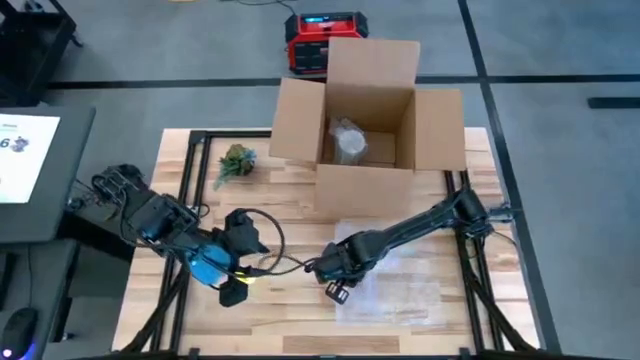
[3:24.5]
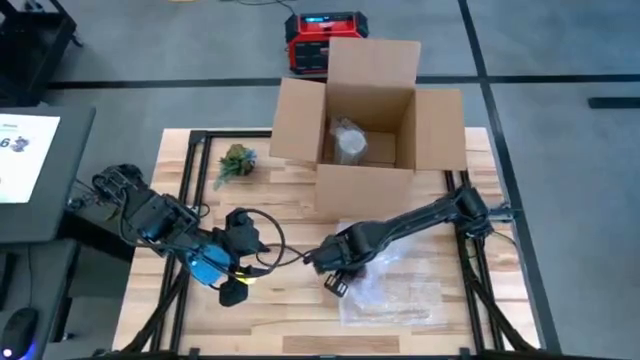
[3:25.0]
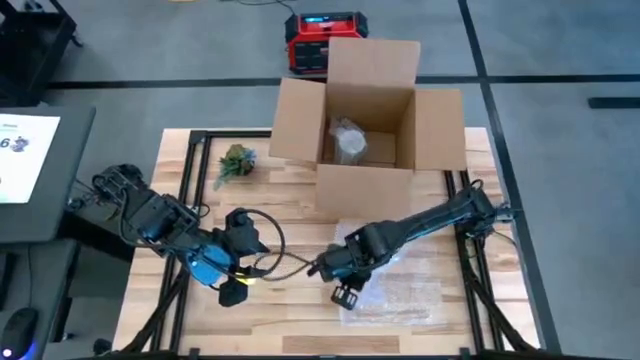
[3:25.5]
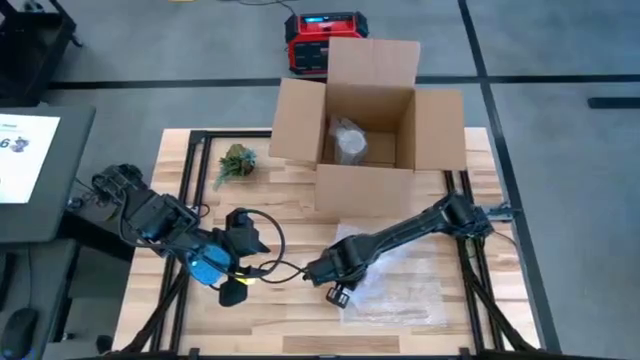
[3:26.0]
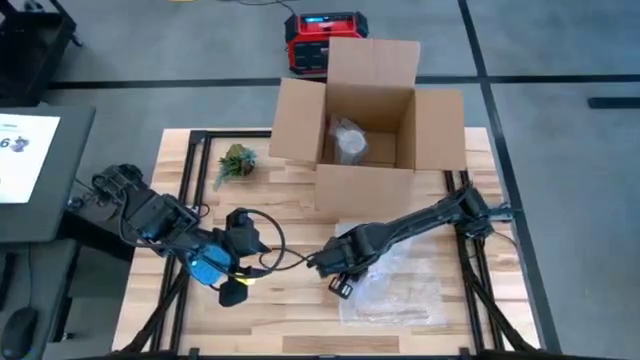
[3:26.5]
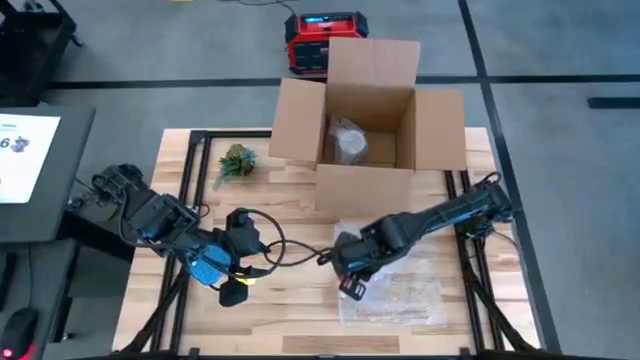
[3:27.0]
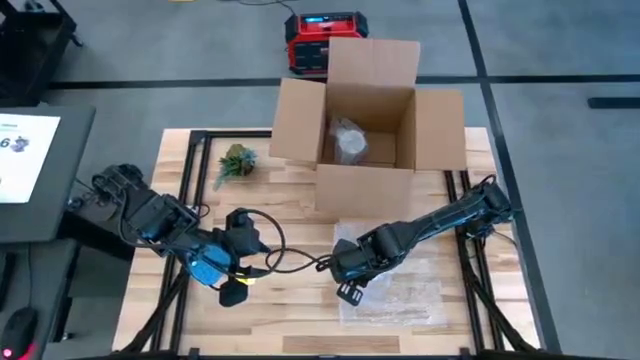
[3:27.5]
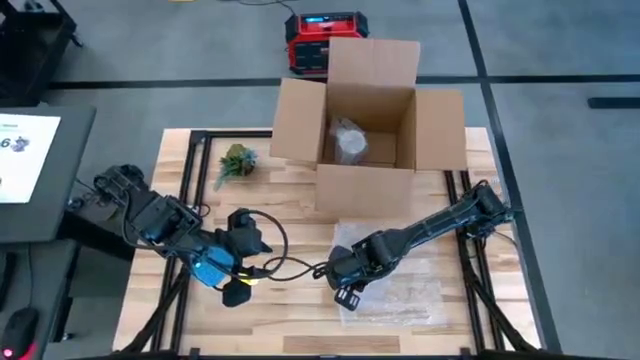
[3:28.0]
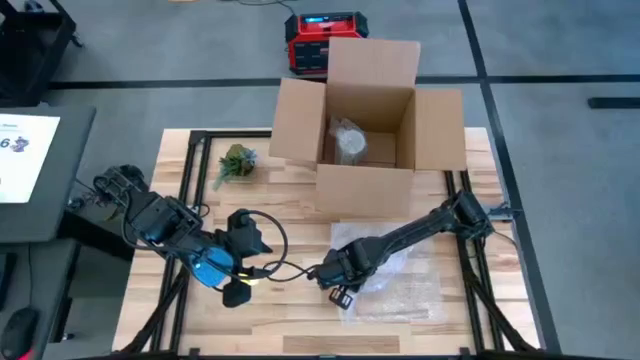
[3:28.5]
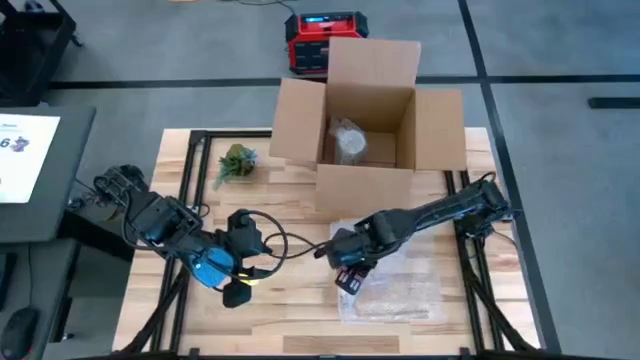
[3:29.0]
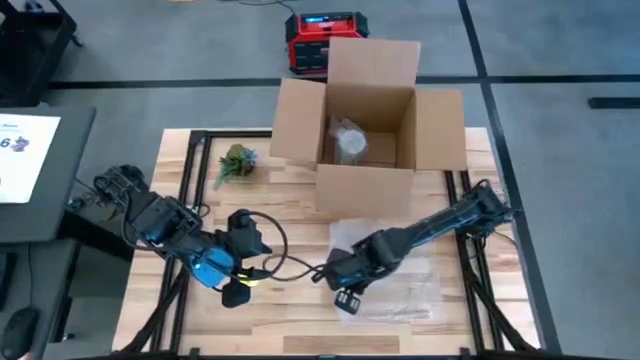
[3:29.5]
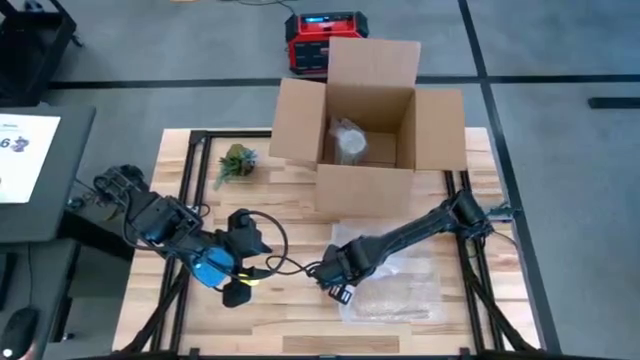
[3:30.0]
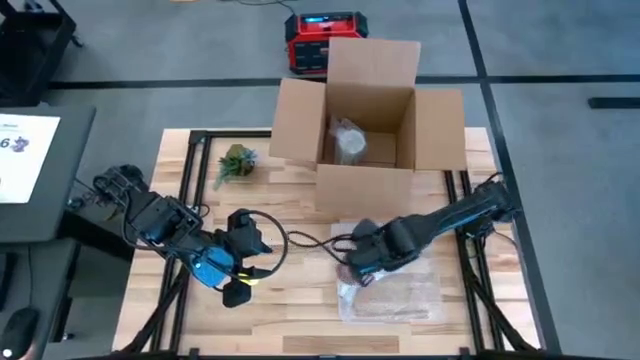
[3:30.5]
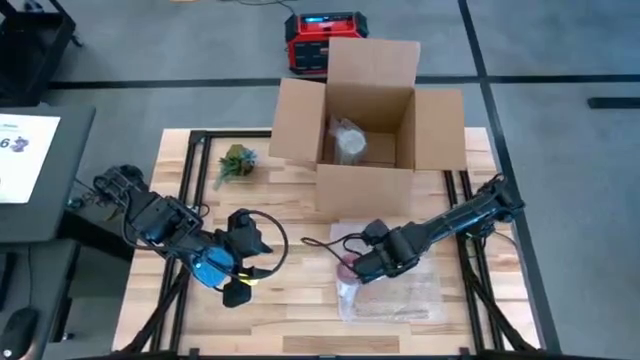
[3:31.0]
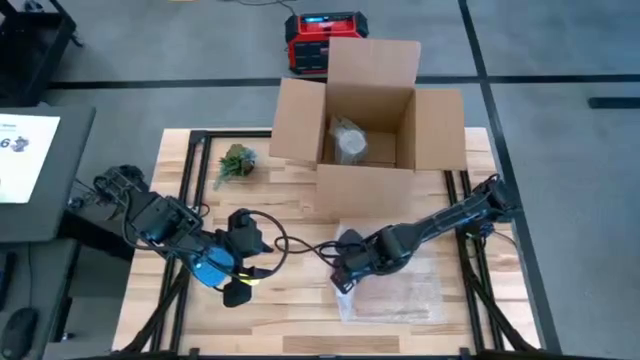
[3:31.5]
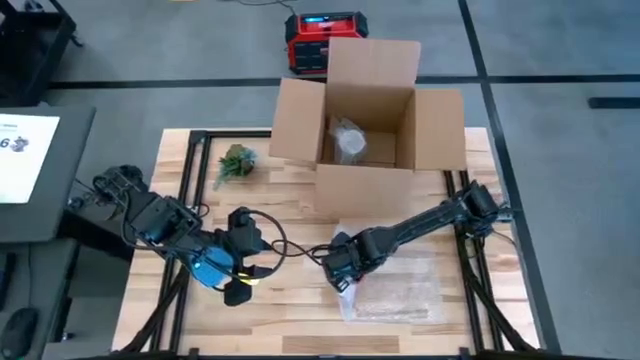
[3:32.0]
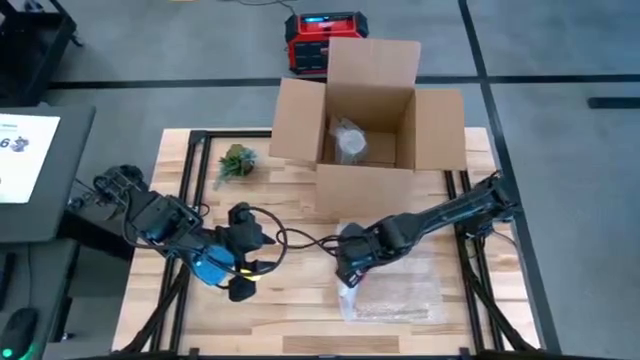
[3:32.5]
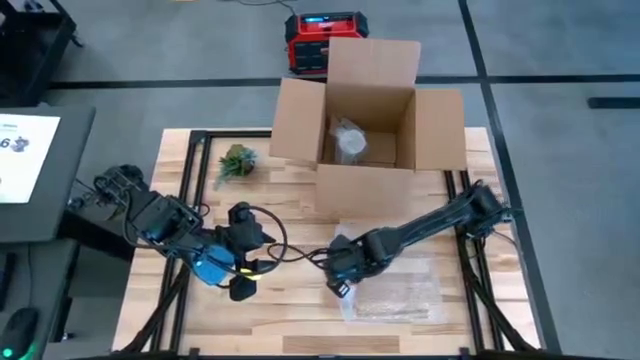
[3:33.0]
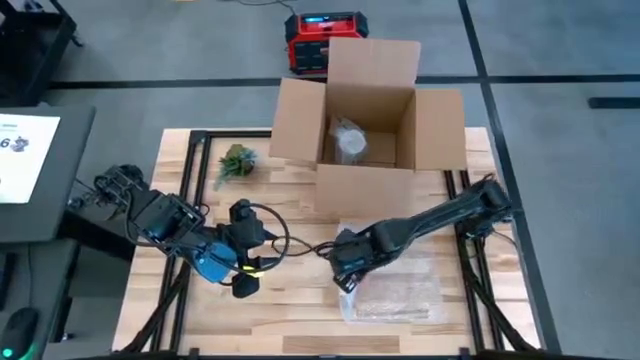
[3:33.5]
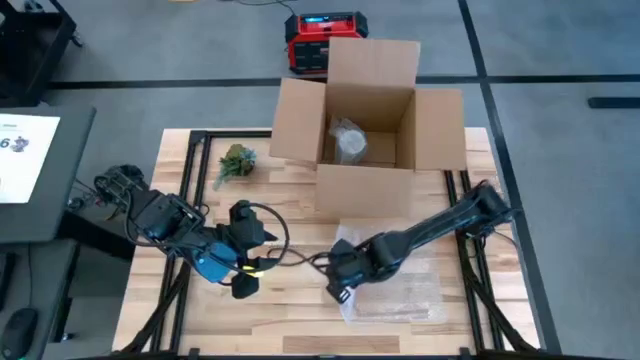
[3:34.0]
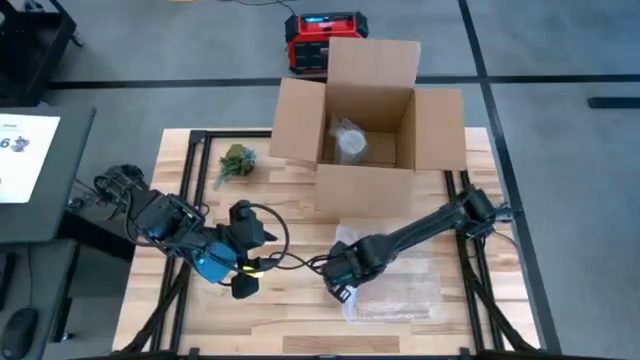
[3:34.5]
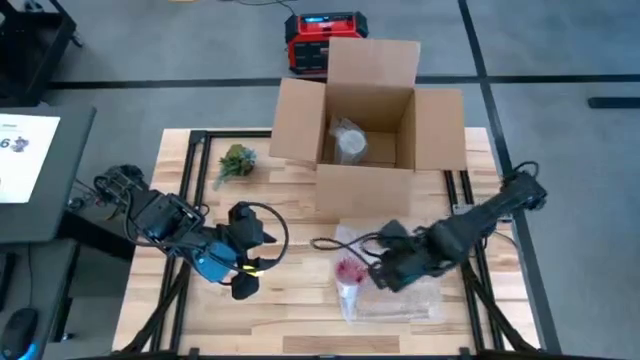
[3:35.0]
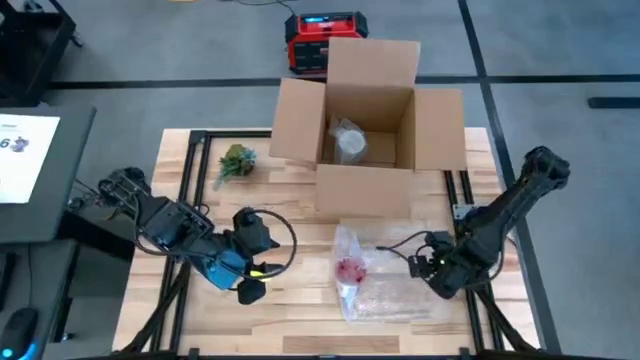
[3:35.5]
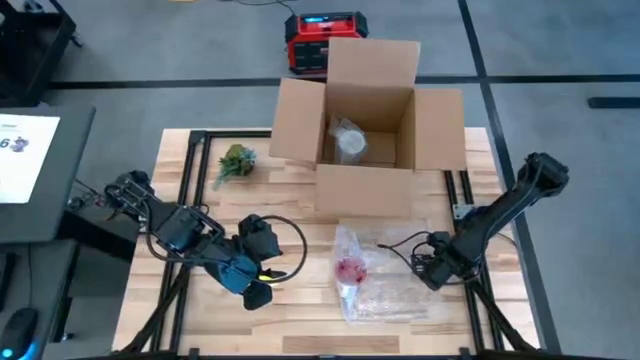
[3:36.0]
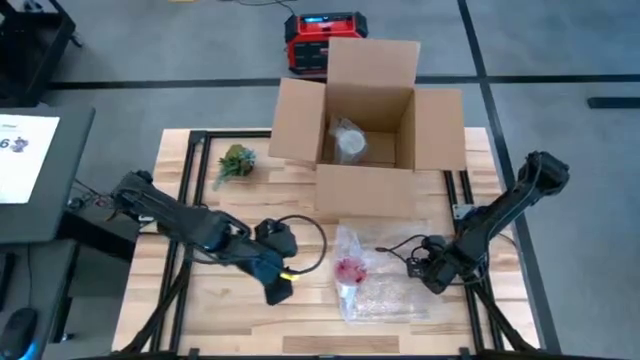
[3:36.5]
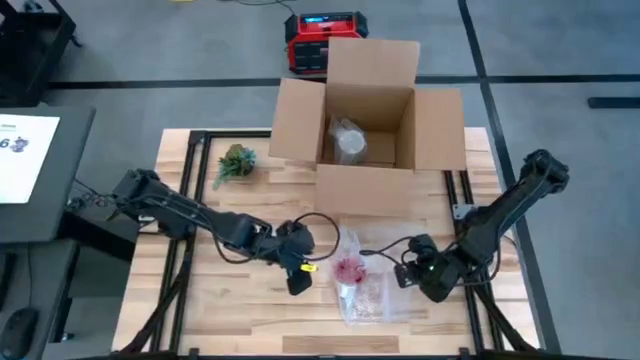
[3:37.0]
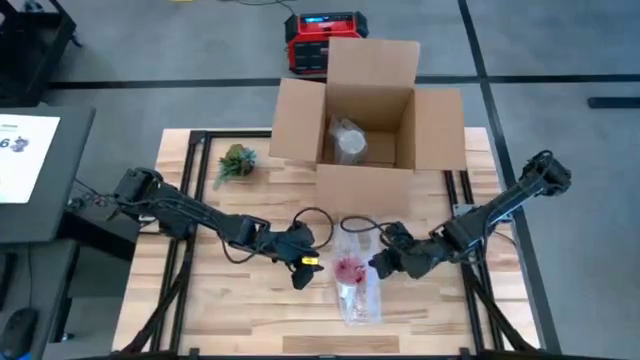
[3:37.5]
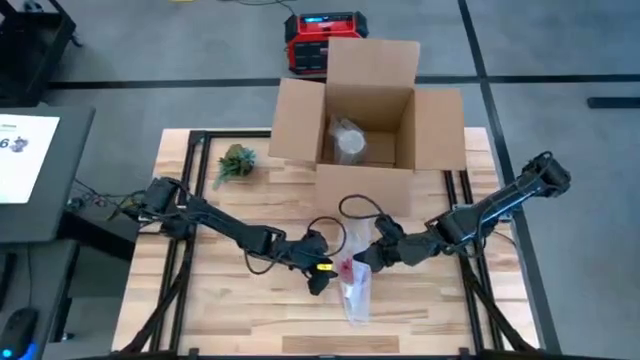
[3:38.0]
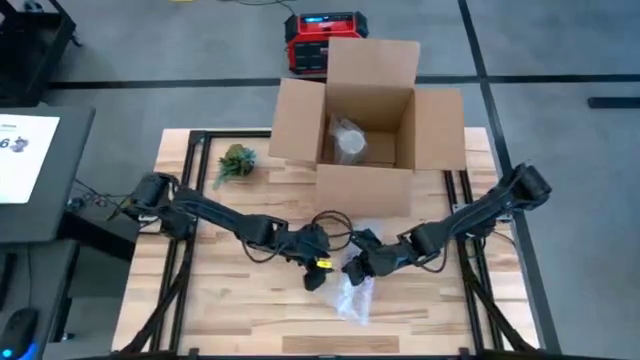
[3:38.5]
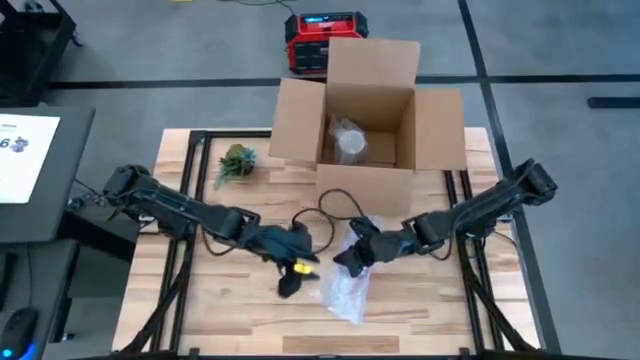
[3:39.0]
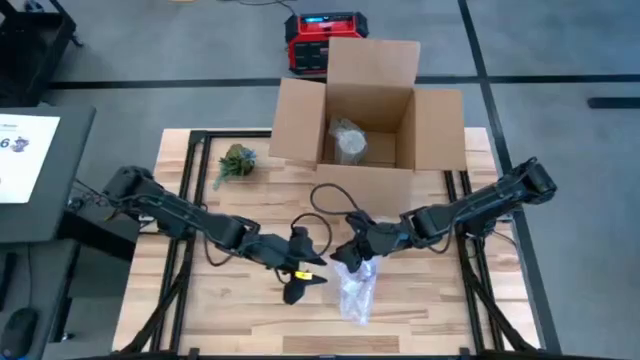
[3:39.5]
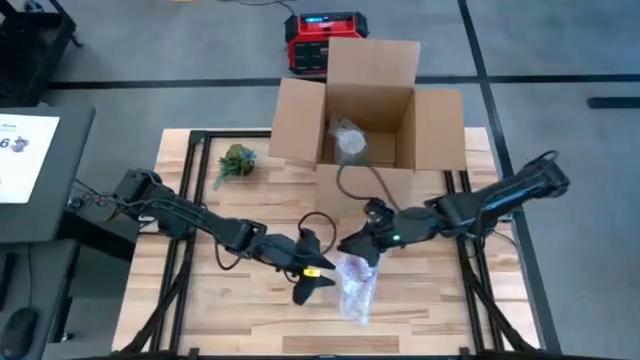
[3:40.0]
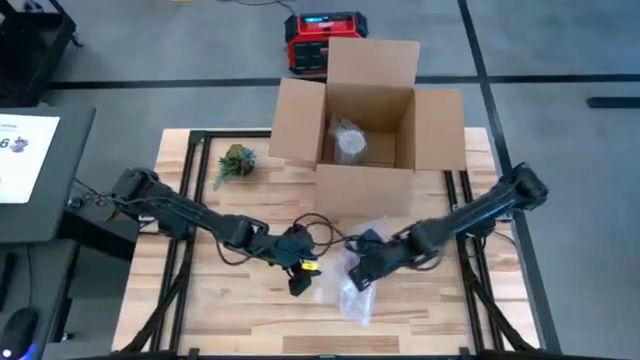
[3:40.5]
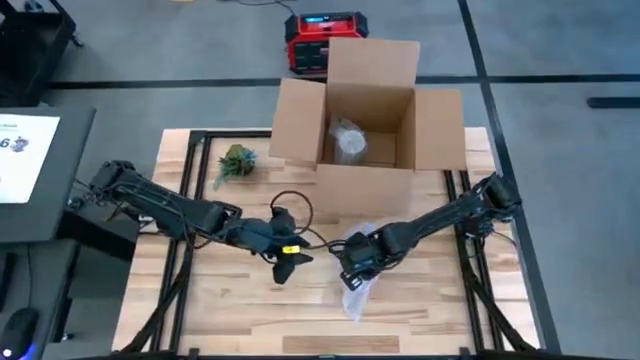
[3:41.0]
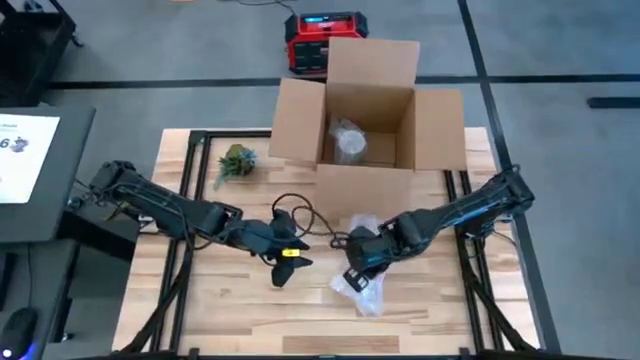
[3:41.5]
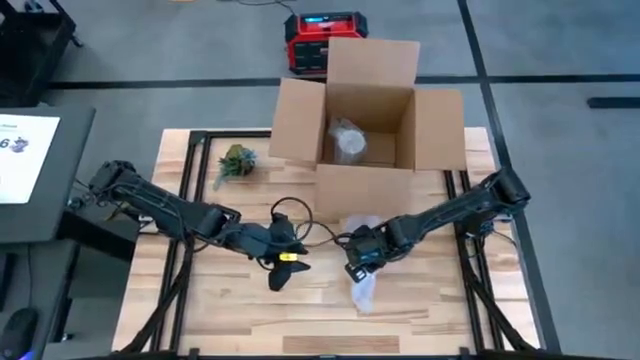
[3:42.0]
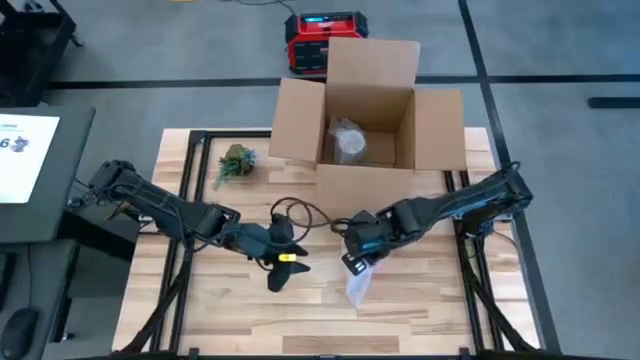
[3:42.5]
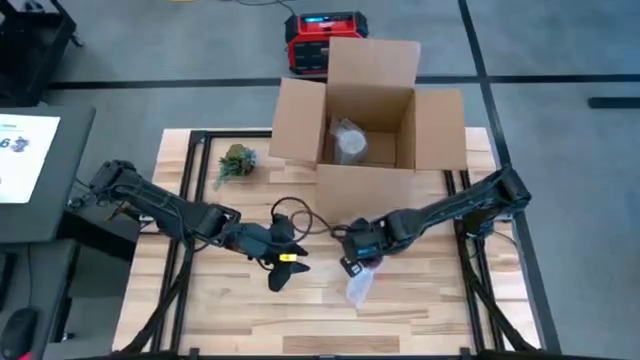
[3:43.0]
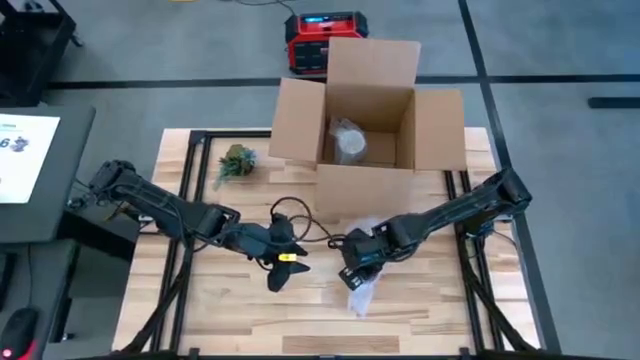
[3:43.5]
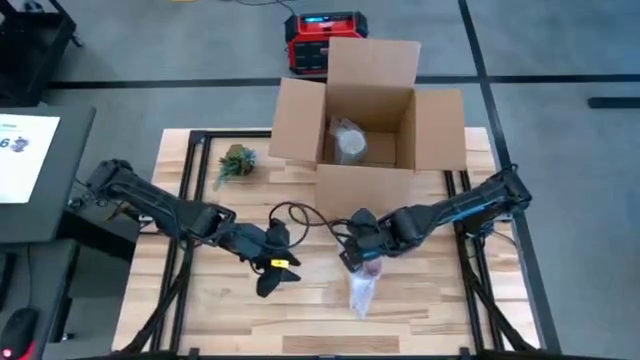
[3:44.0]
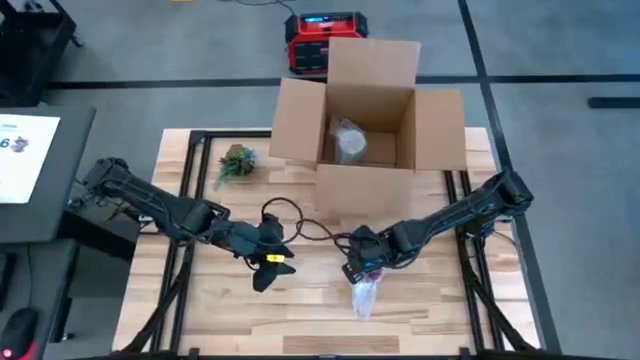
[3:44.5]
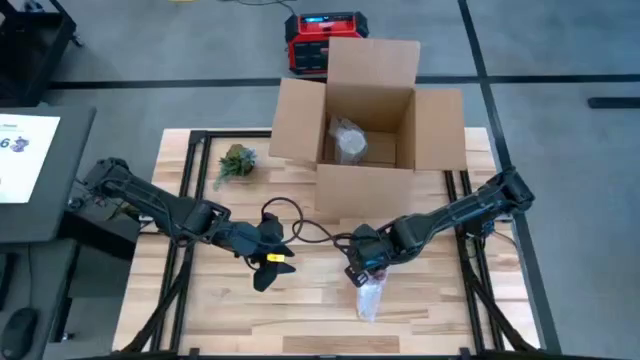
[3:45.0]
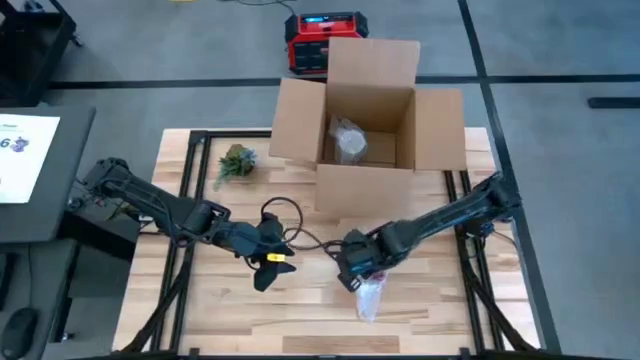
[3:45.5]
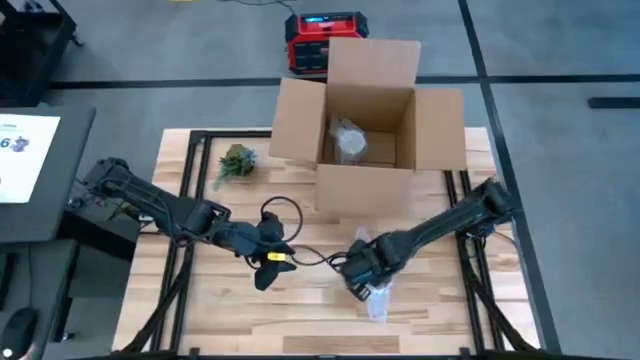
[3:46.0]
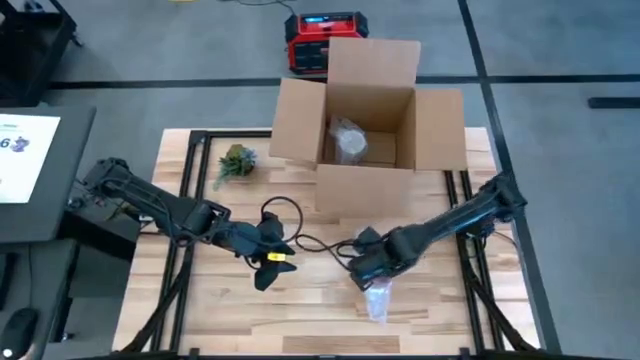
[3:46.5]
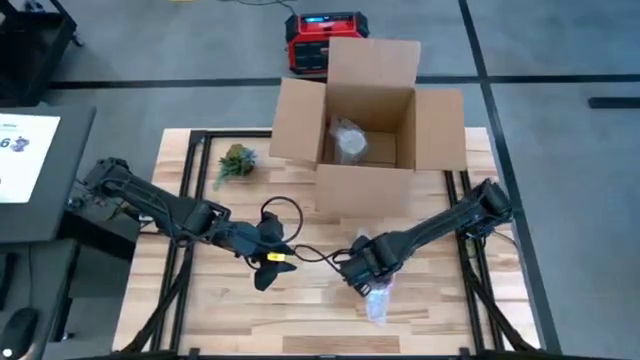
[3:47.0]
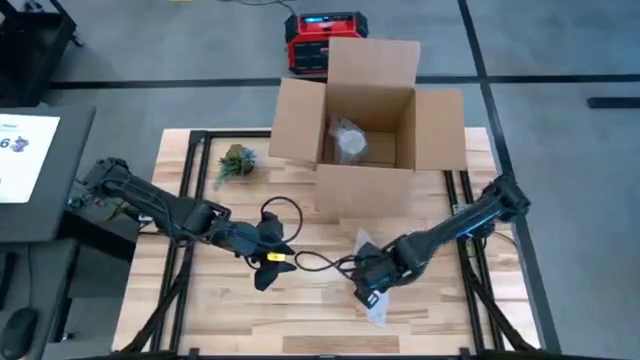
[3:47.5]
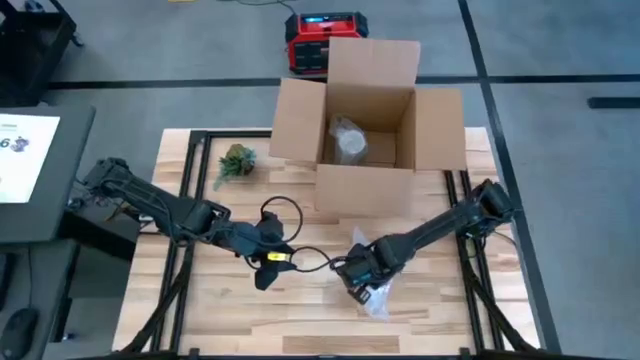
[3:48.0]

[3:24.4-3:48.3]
Task: wrap mug
Wrap the red mug in the bubble wrap
